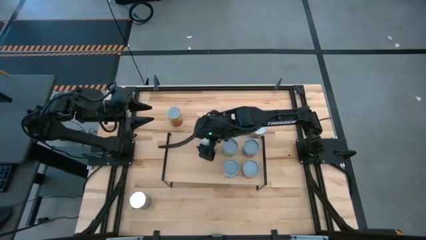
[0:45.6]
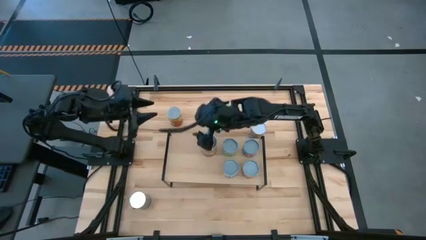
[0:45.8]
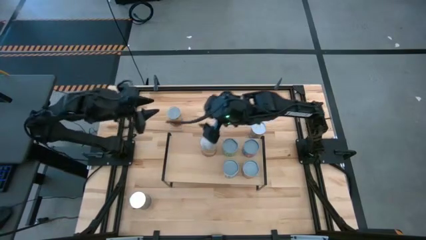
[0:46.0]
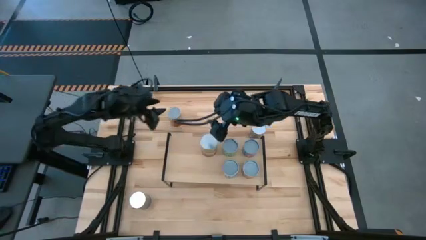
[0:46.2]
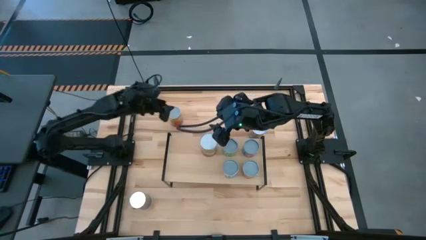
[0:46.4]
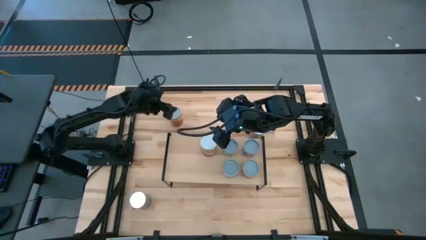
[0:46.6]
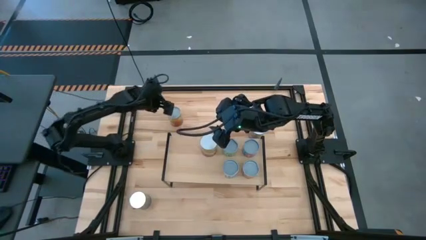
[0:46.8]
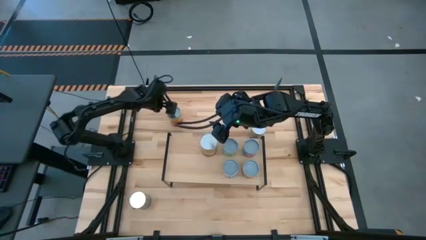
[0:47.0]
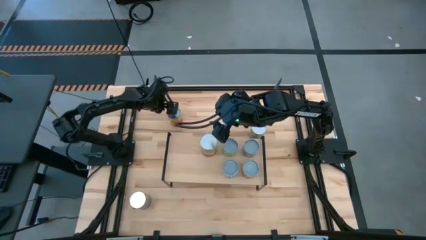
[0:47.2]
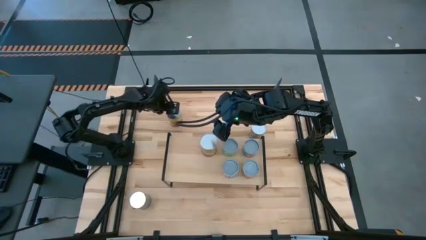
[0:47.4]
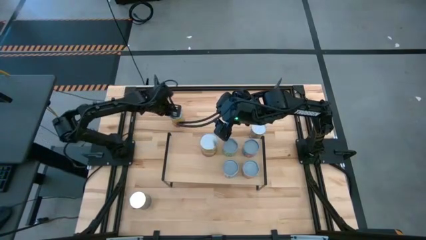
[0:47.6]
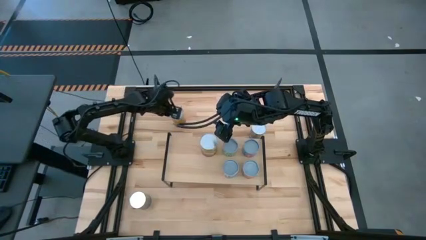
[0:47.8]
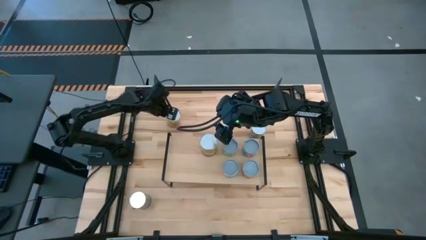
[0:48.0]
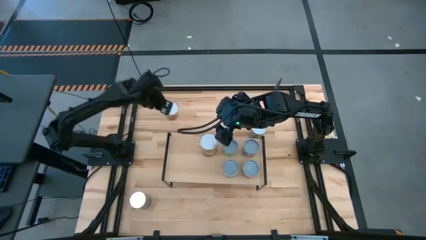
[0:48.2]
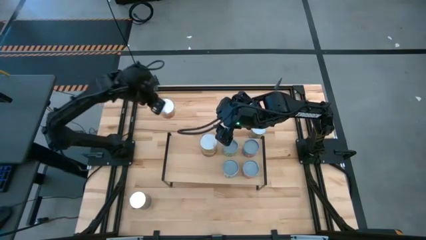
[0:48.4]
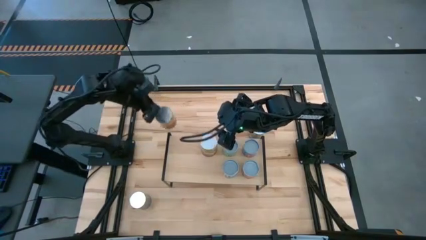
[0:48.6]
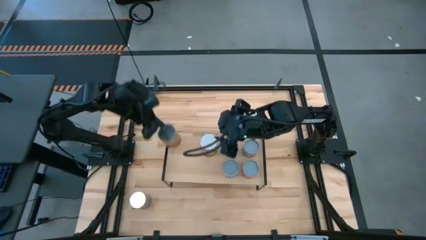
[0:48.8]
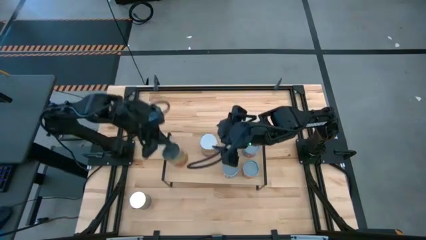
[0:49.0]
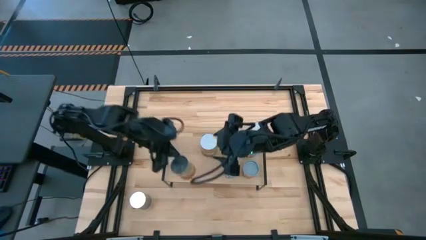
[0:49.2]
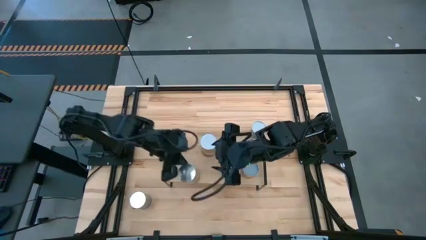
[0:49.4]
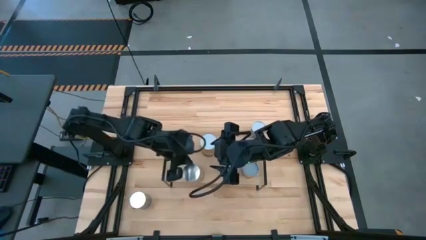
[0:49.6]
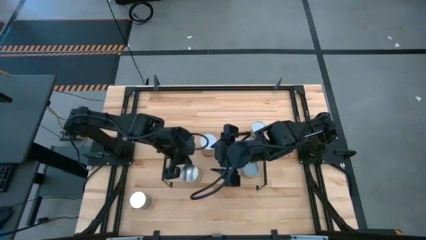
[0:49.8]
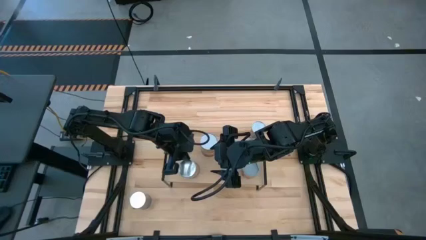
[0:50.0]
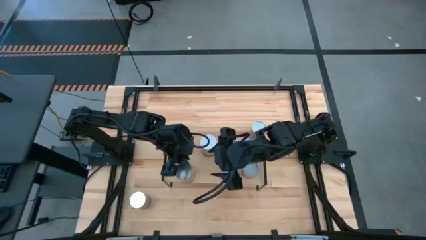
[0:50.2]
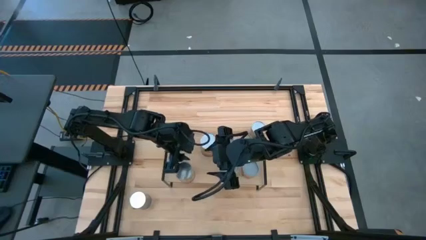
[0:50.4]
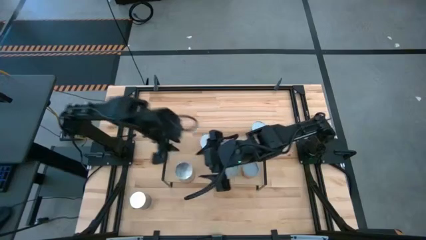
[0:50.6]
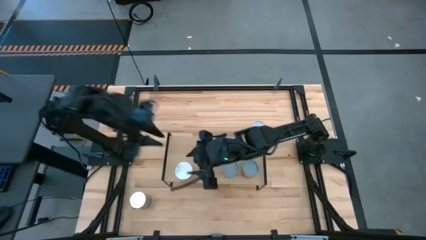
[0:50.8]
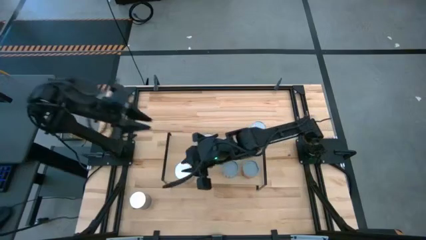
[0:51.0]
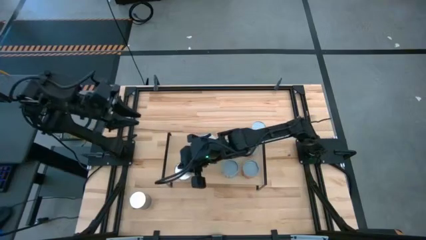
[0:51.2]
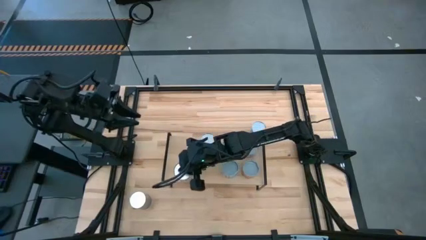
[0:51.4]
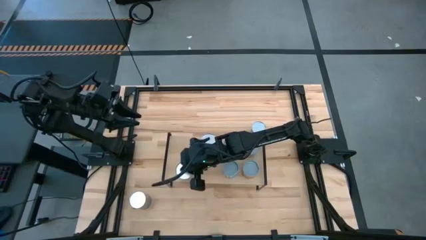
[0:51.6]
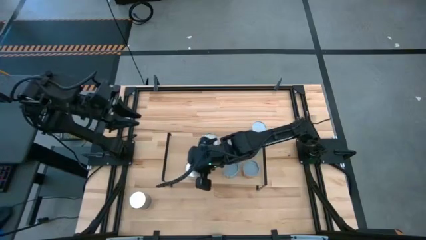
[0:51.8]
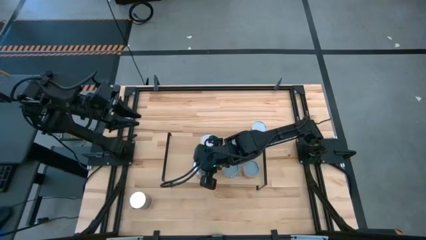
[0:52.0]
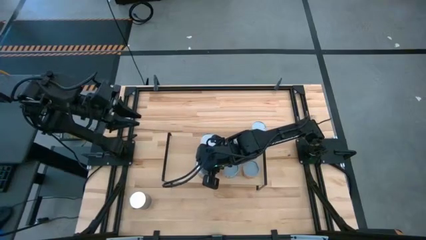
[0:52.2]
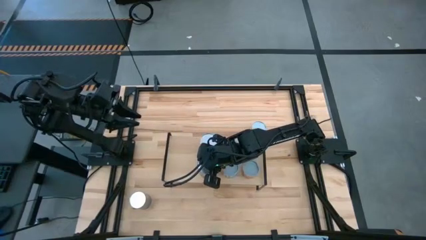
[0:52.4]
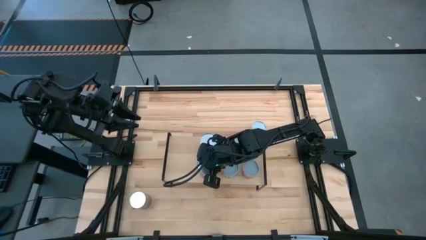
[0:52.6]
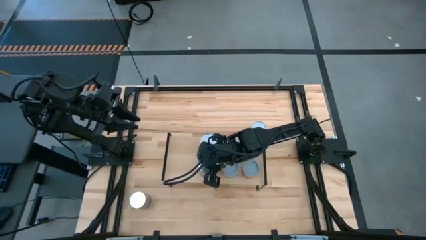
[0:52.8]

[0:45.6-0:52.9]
Task: Pick and place cans onto a shelf
Put the large canned corn on the shelf

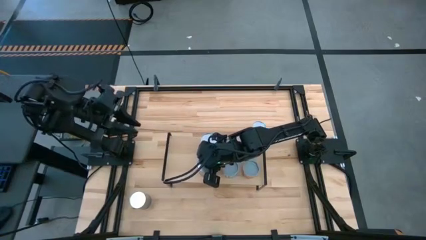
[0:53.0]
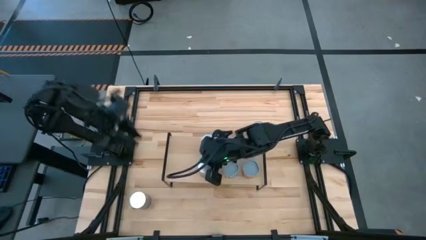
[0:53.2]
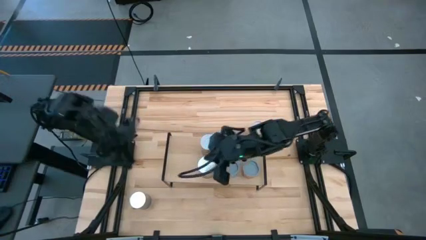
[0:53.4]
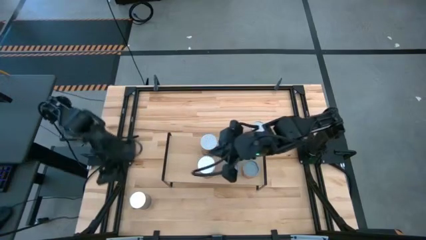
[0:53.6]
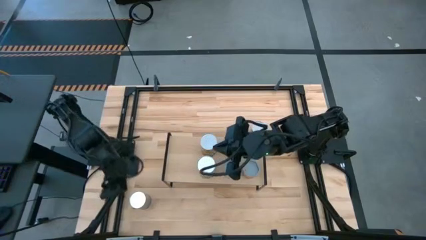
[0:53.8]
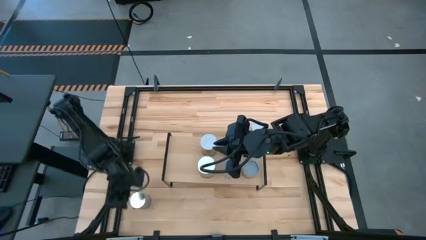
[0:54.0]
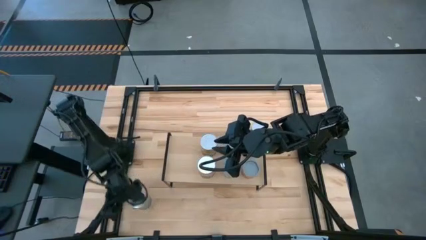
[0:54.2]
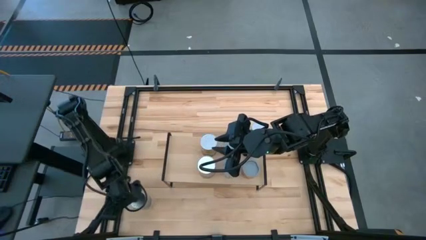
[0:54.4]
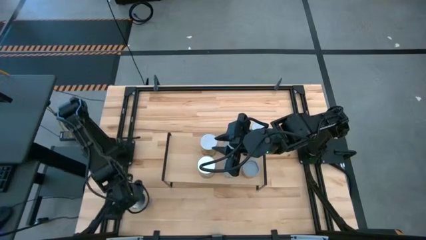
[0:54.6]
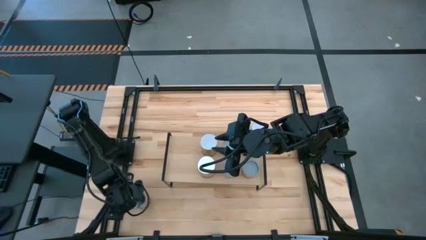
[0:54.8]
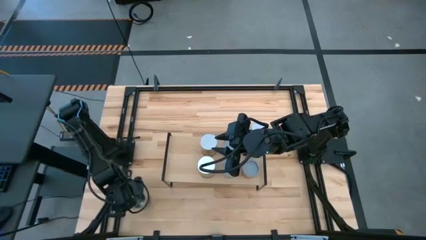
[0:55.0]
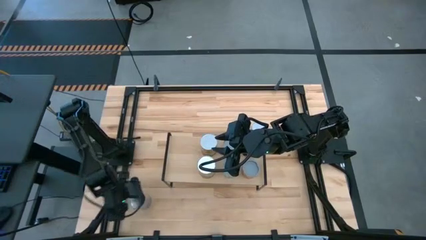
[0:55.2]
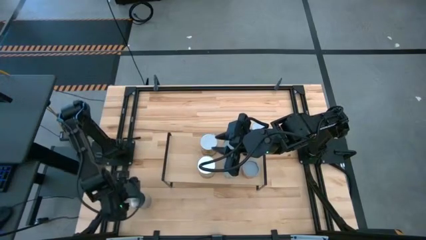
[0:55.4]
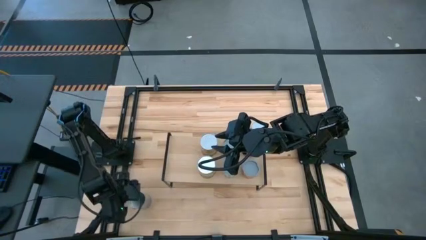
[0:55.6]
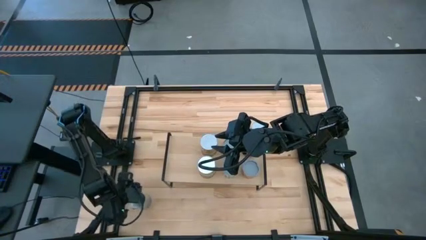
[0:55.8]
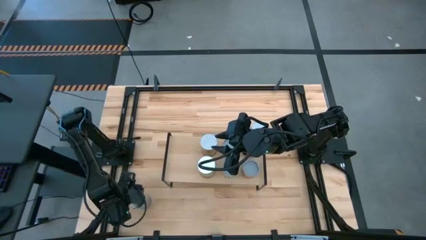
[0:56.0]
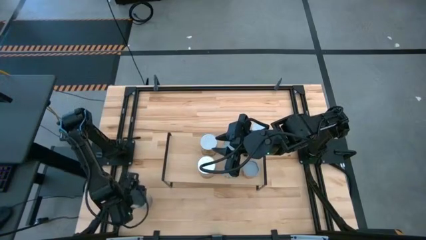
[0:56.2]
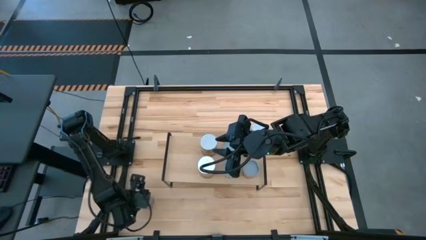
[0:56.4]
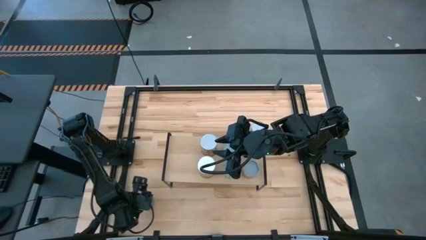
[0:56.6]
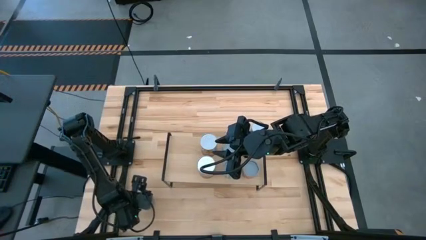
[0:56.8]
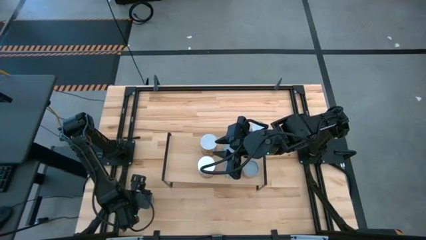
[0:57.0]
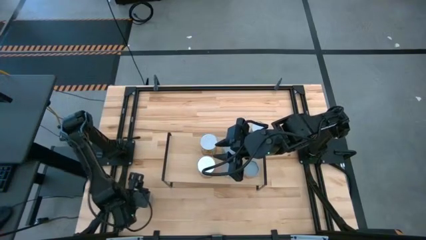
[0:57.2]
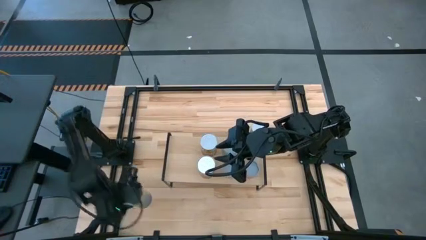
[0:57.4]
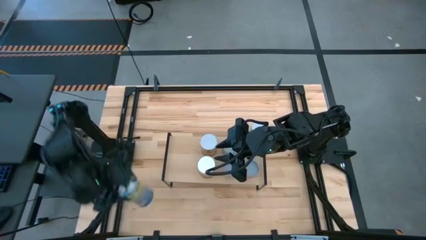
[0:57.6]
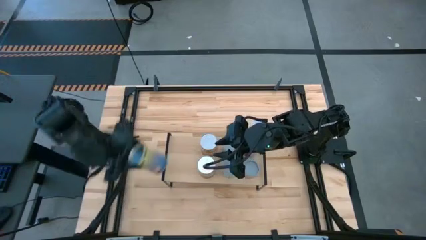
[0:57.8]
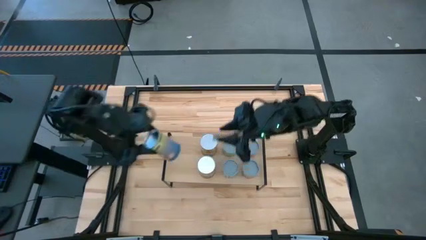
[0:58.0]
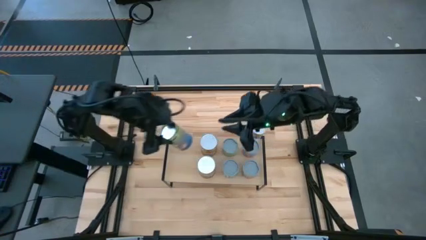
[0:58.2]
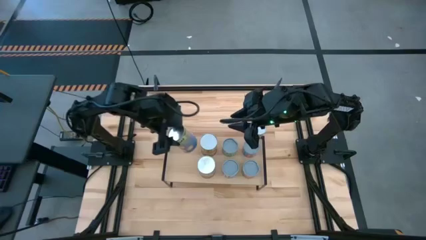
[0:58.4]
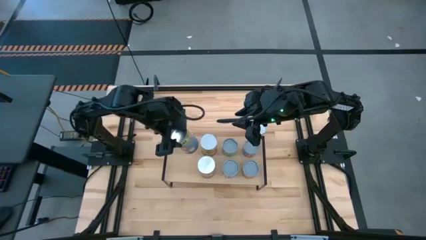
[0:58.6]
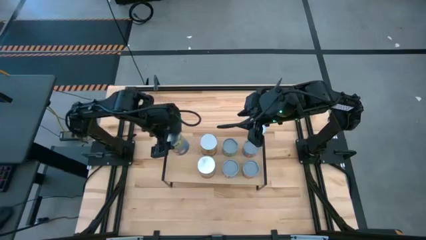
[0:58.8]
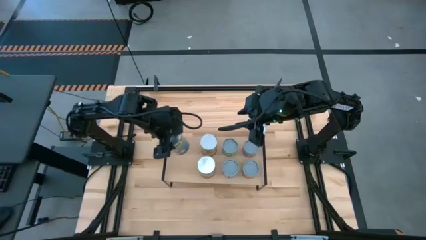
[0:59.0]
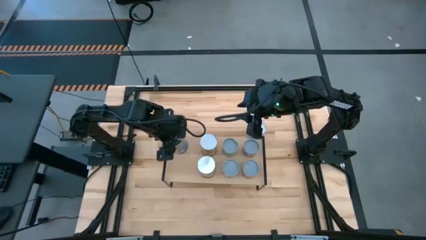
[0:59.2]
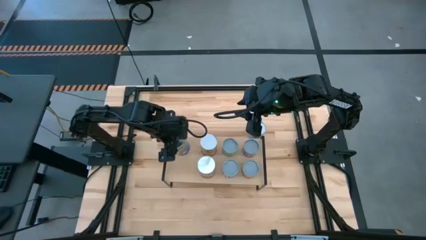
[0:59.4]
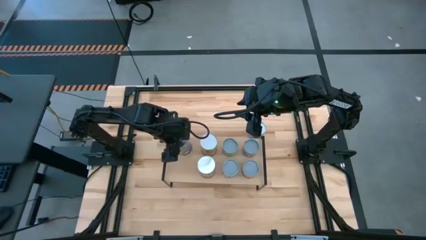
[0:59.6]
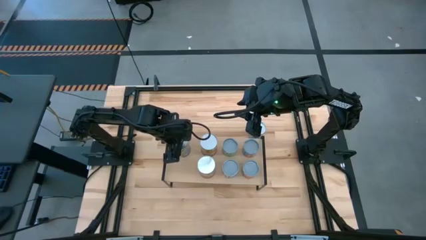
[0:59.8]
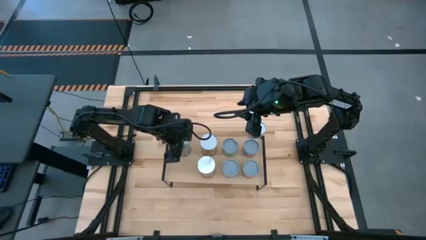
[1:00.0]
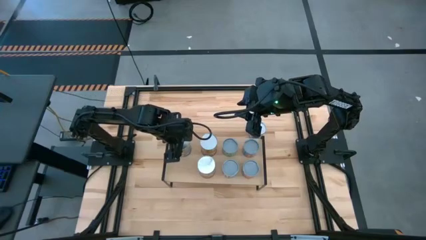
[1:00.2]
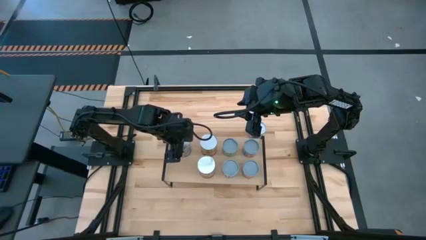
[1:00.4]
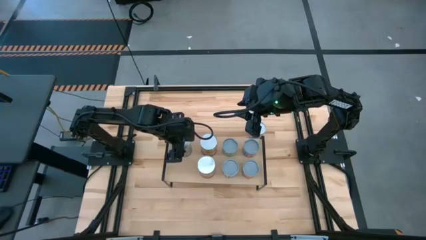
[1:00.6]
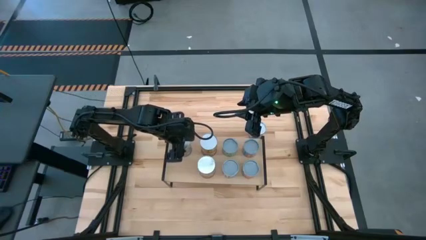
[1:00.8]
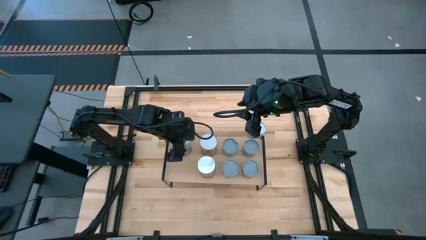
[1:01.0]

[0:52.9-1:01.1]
Put the bottom large canned peaches on the shelf
